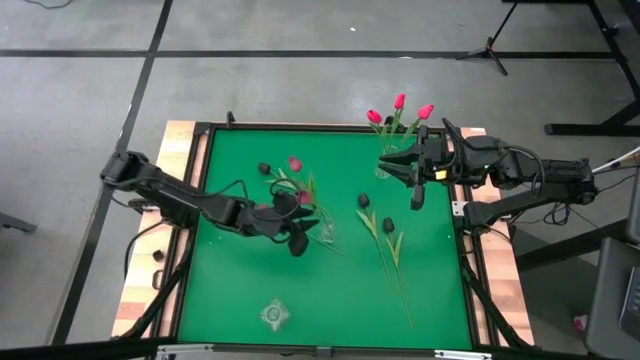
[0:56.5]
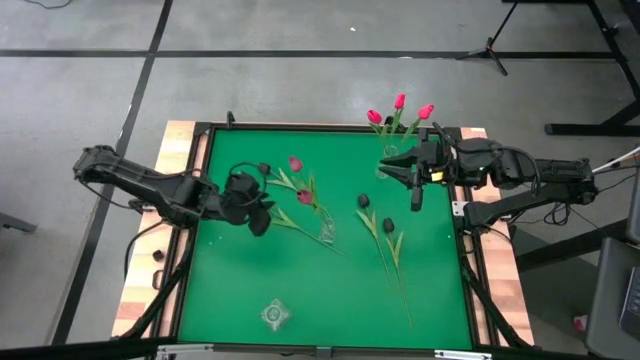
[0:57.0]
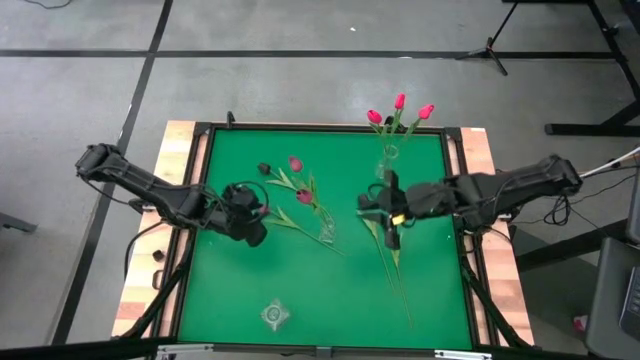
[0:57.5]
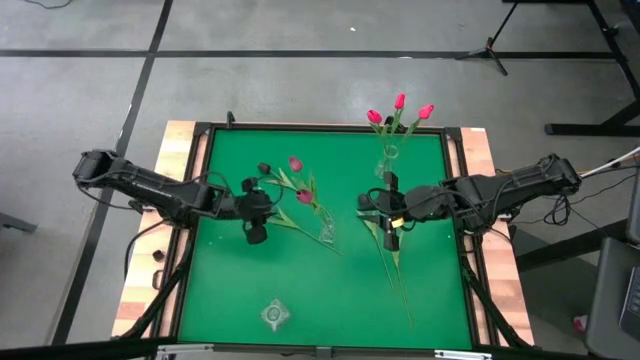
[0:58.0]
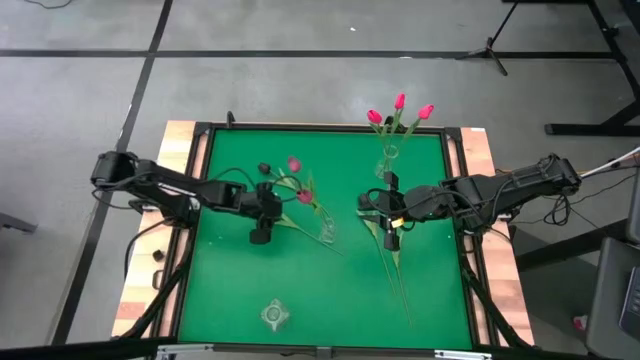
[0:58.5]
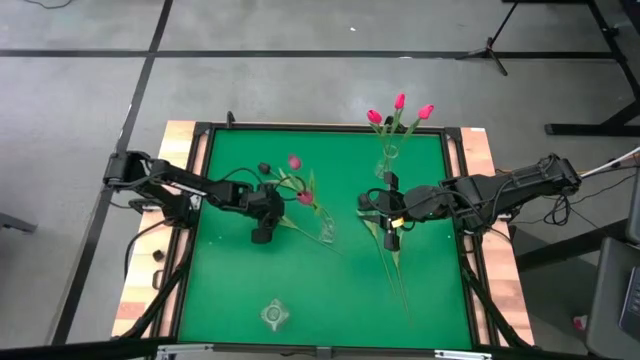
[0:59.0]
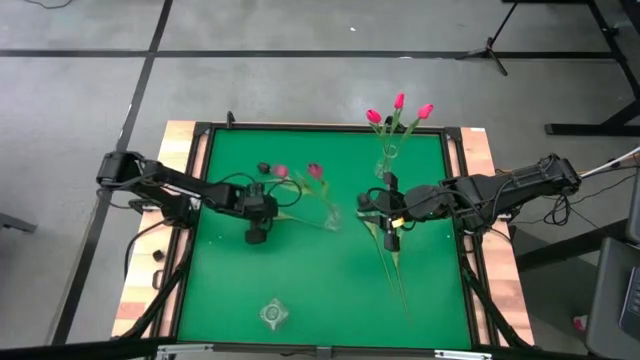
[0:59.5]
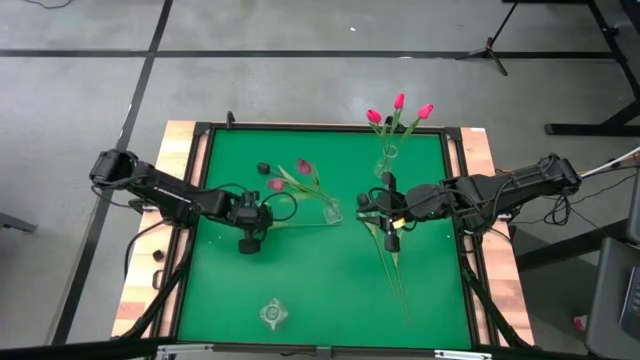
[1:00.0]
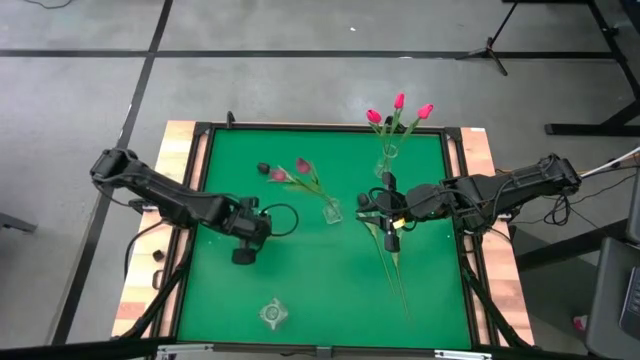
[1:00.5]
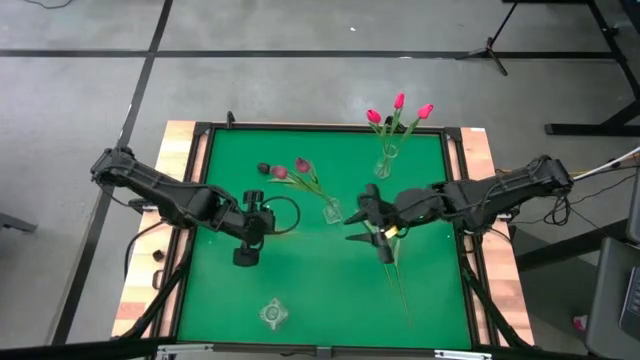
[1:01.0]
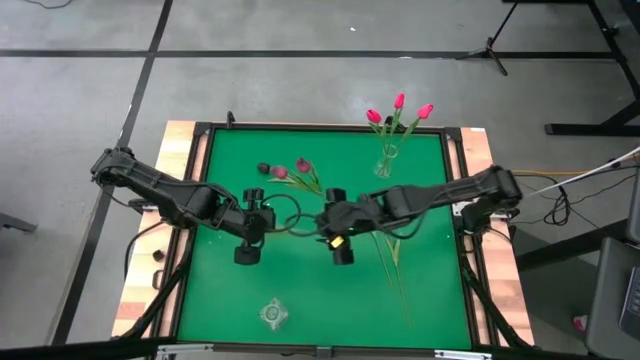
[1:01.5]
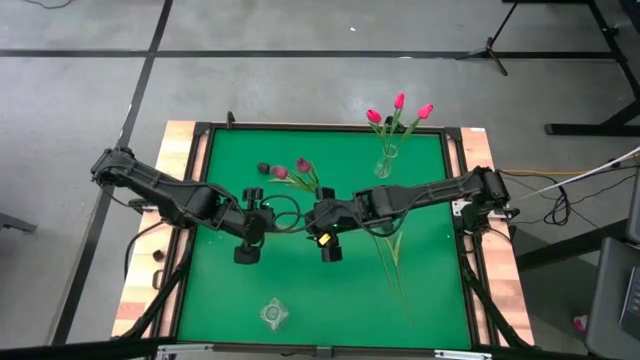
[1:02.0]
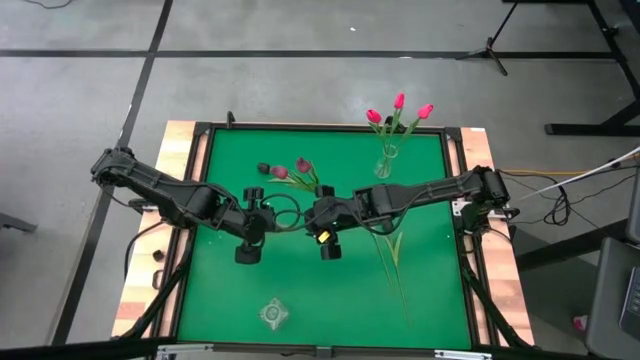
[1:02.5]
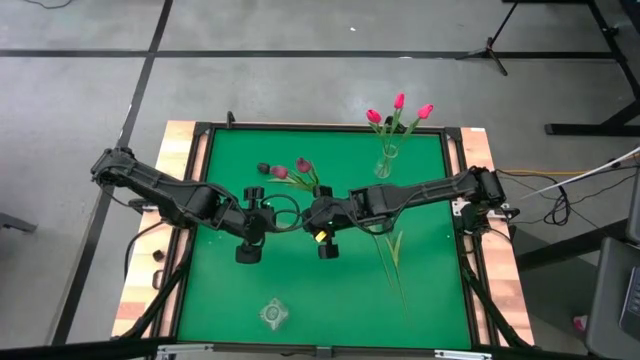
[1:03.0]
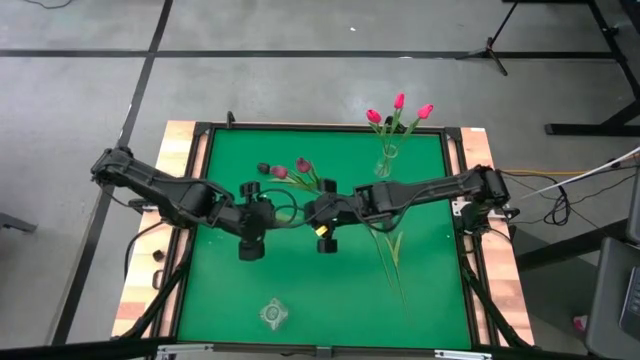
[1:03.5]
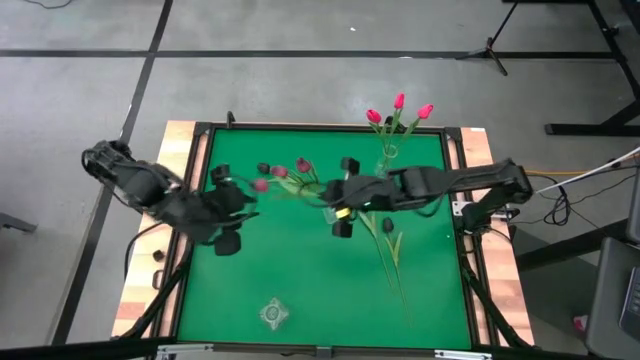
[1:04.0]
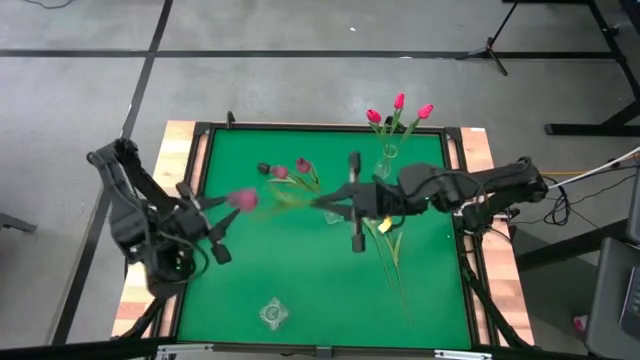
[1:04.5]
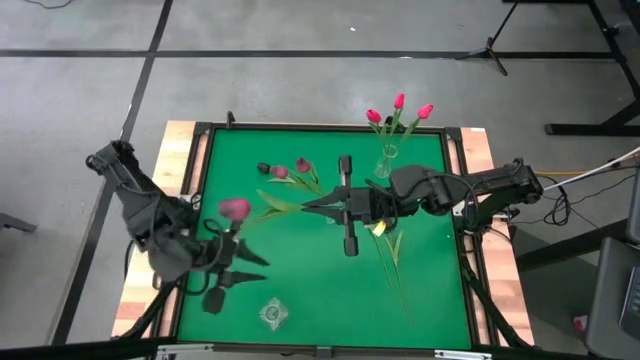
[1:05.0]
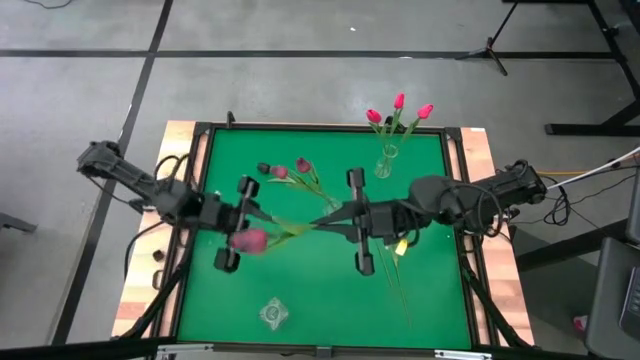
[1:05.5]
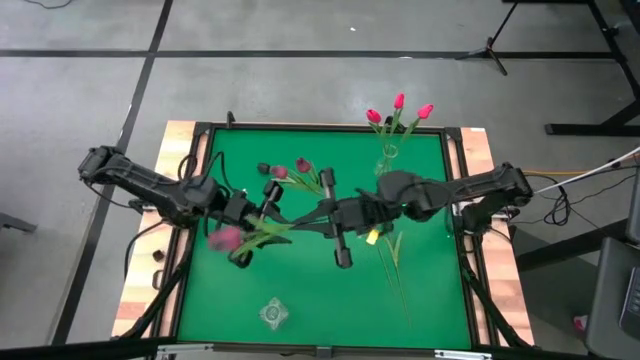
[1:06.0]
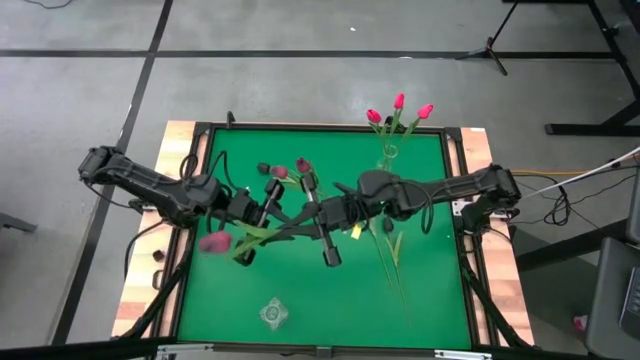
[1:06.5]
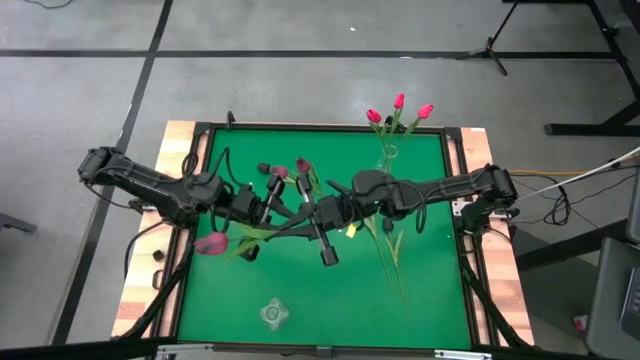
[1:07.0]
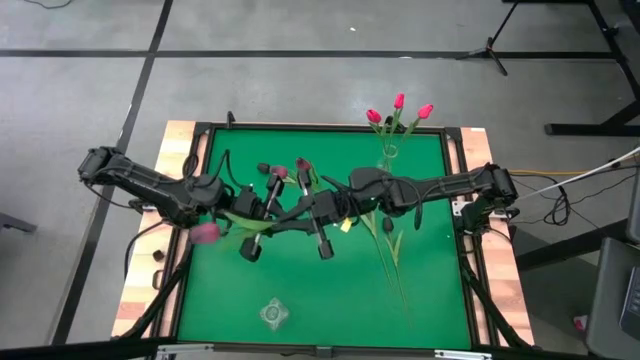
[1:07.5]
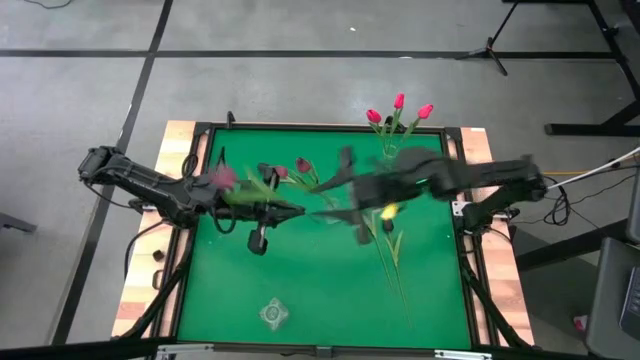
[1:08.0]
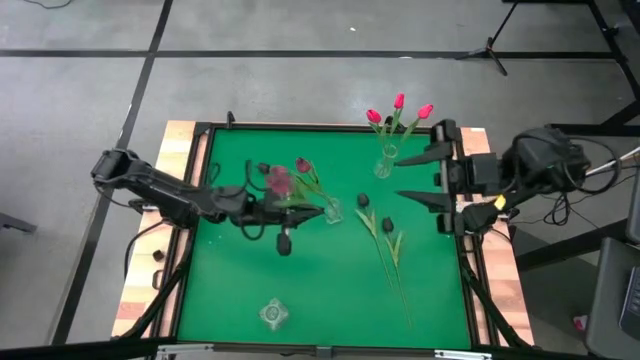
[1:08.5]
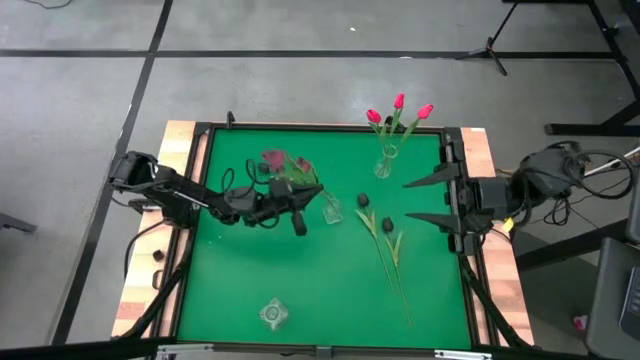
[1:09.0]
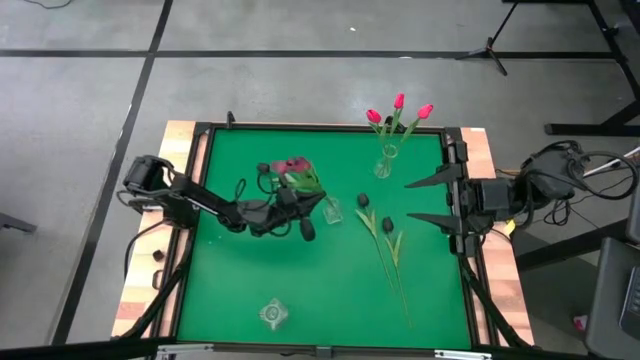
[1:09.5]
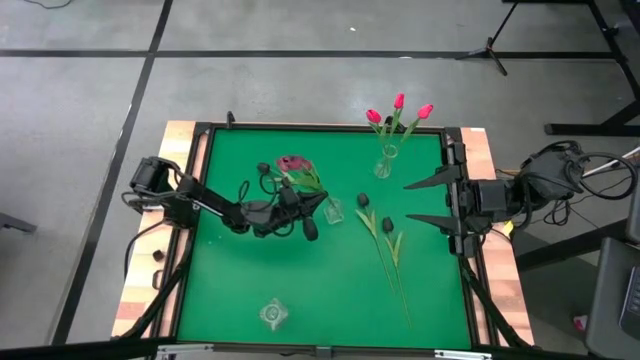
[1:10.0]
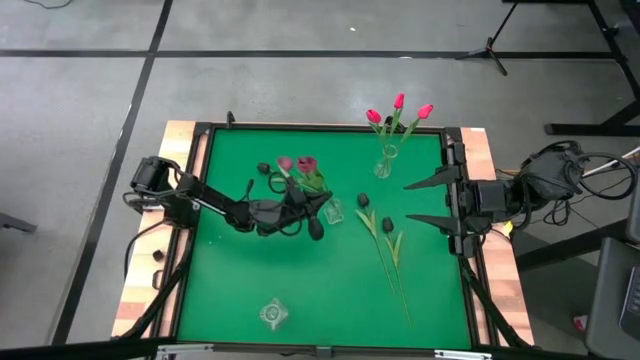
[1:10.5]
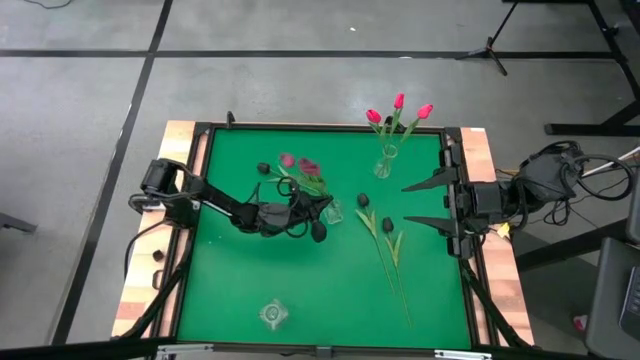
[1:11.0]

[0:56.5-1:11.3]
Task: Sort flowers into vase by color
Put the dark red tulip into the center transparent vase

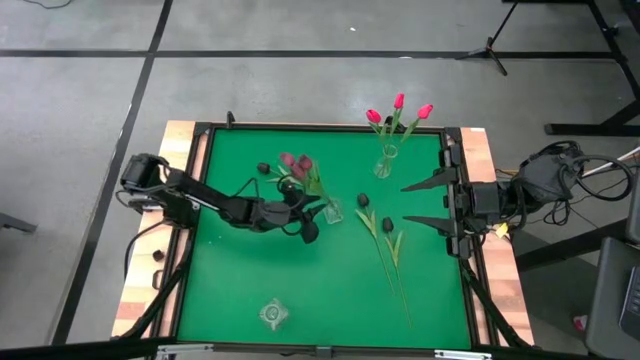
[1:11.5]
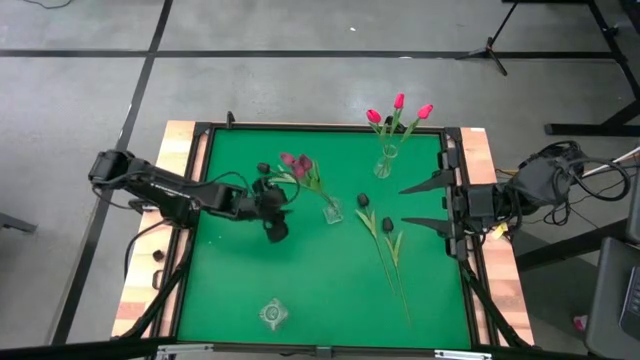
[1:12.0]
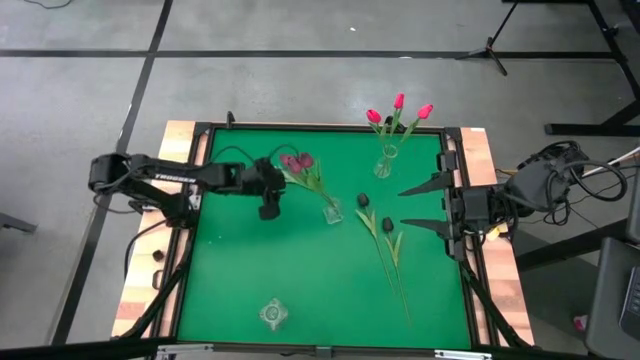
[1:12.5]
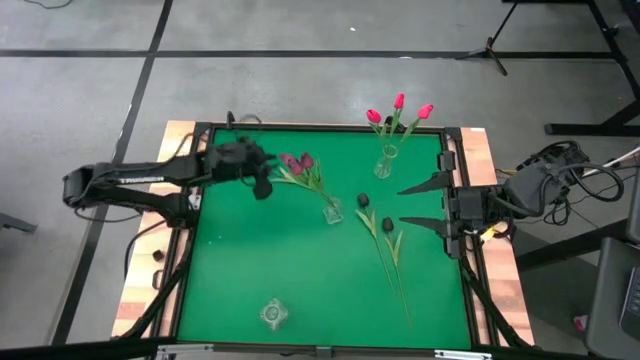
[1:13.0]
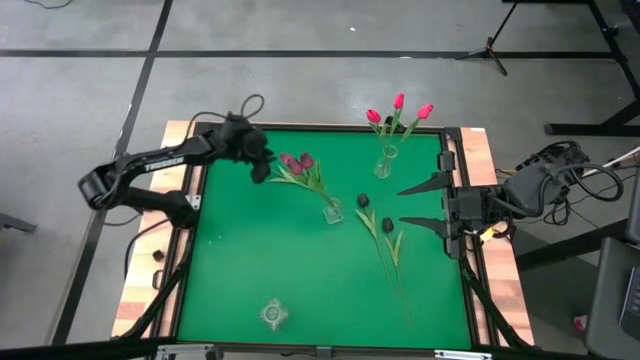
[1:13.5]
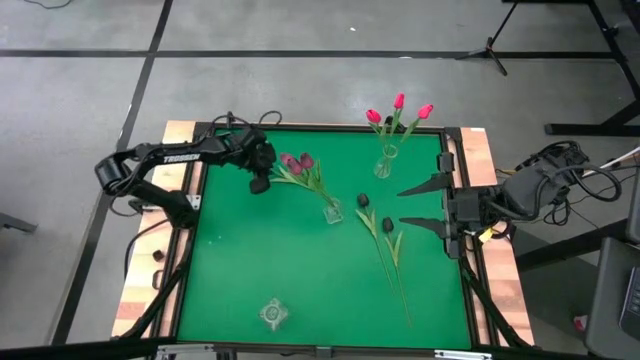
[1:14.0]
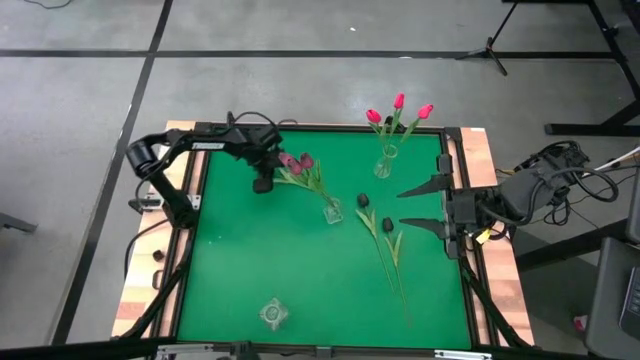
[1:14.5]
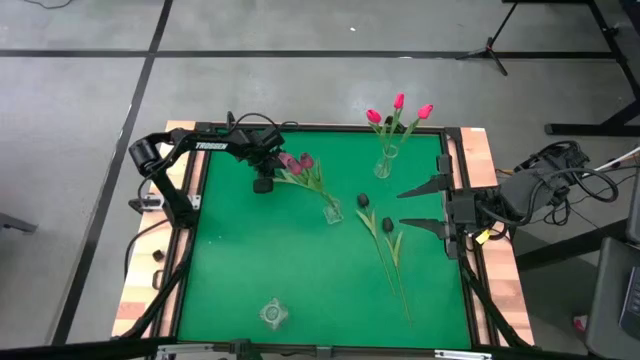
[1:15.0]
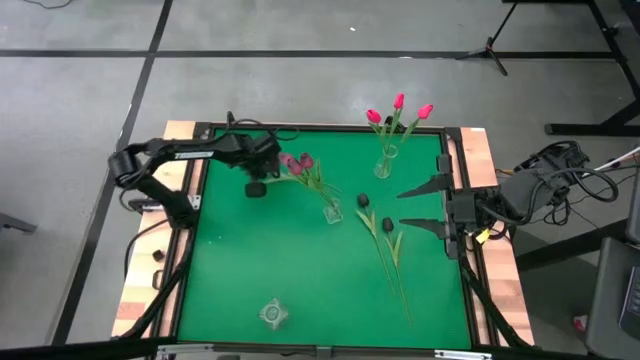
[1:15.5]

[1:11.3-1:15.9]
Put the top left black tulip into the bottom transparent vase

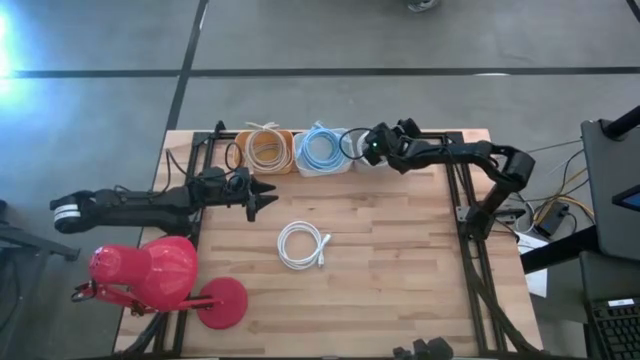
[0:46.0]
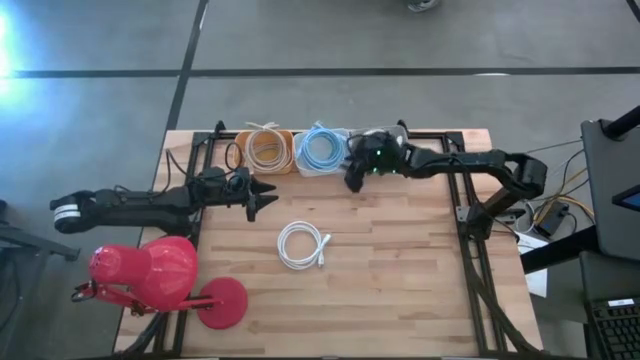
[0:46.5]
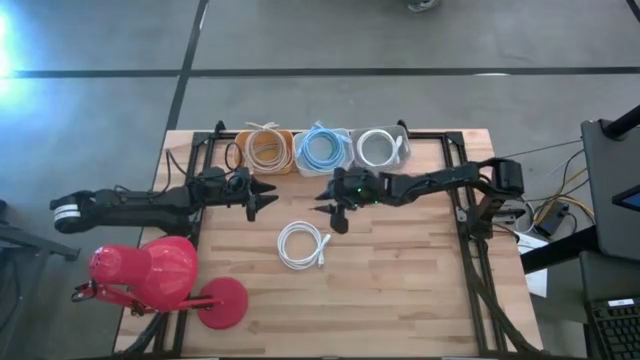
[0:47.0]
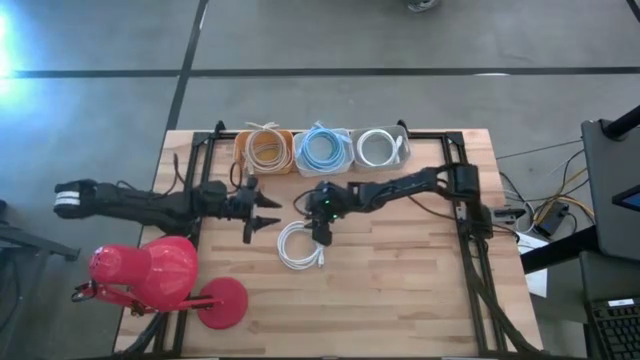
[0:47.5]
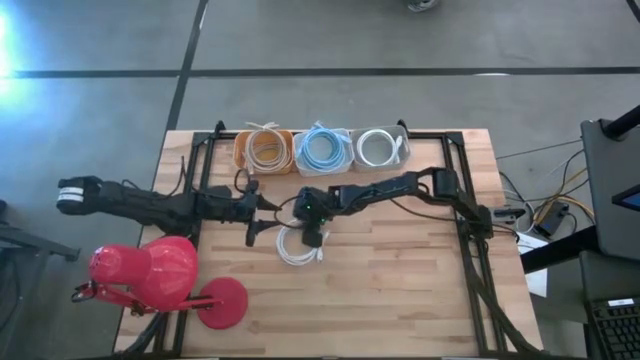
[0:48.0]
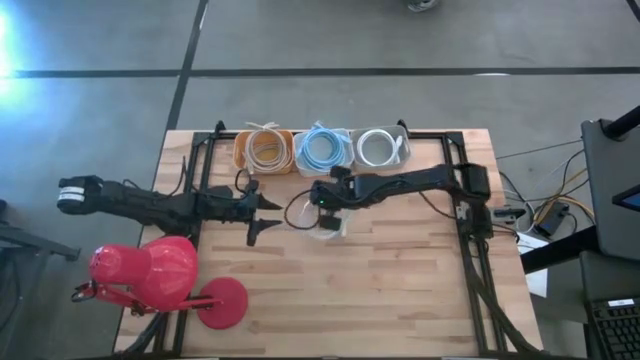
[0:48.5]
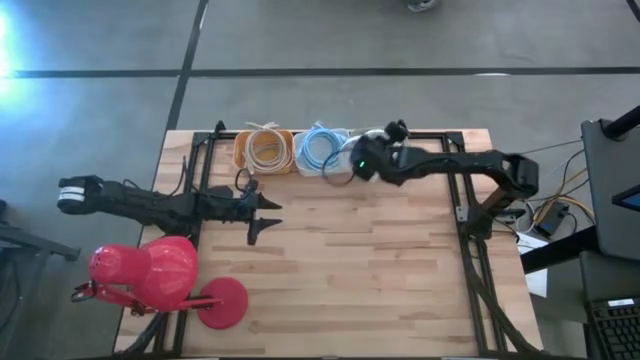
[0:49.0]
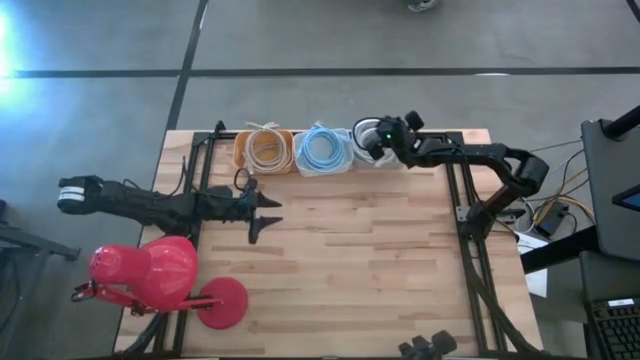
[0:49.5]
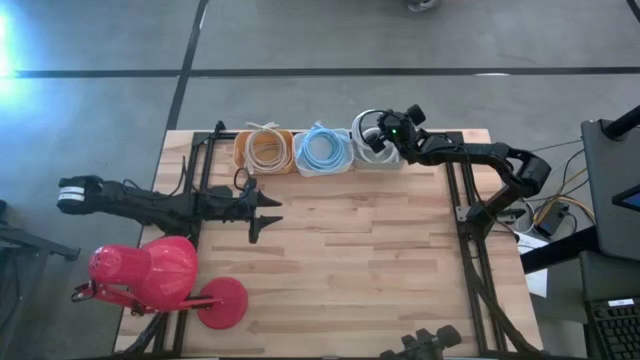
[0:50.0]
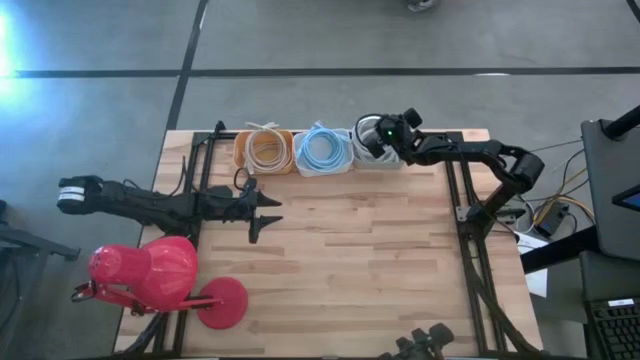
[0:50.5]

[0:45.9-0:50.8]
Task: Sort HDMI cables
Put the white HDMI cable into the gray bin
